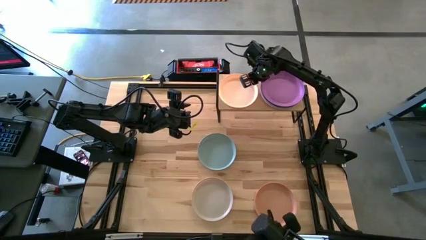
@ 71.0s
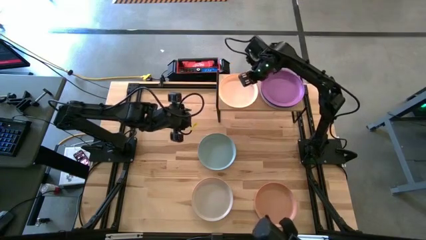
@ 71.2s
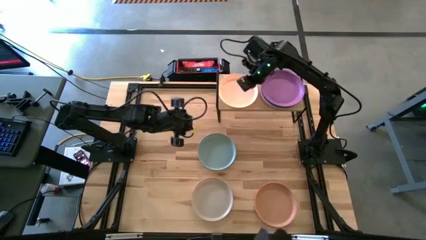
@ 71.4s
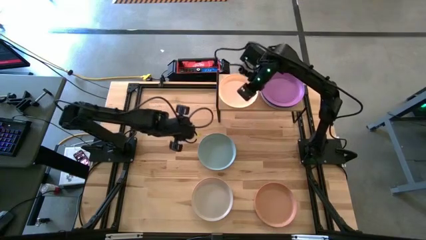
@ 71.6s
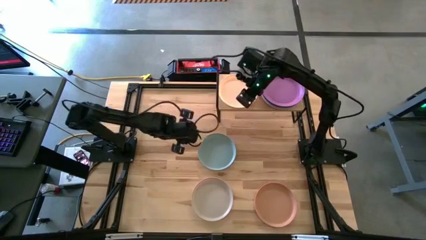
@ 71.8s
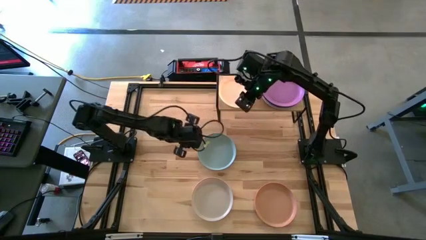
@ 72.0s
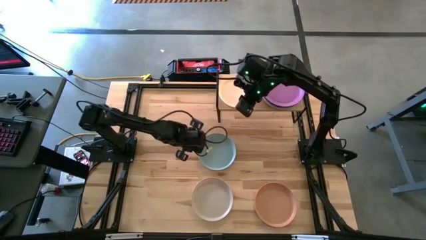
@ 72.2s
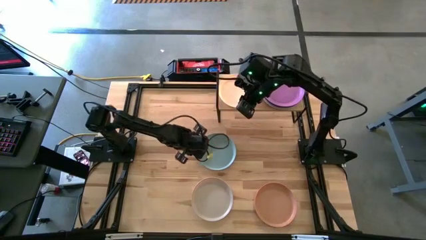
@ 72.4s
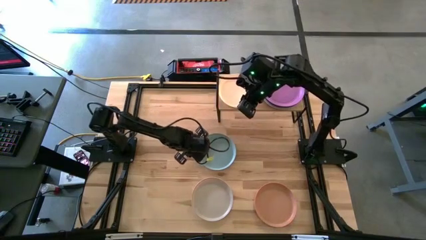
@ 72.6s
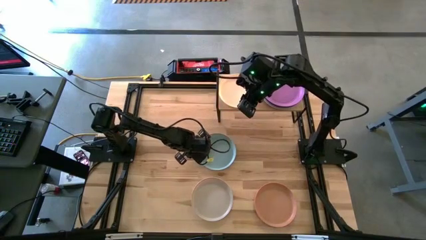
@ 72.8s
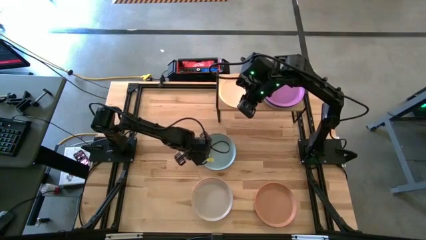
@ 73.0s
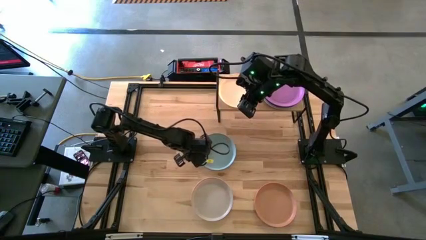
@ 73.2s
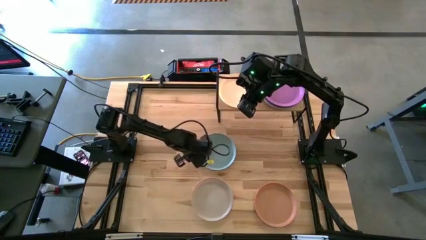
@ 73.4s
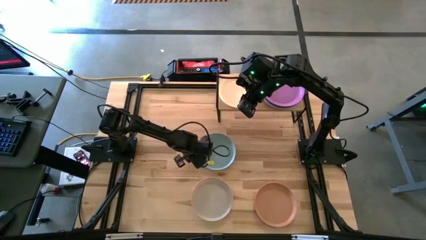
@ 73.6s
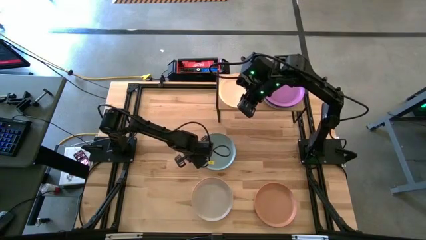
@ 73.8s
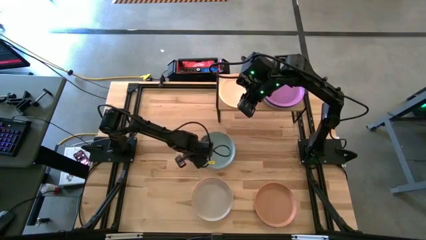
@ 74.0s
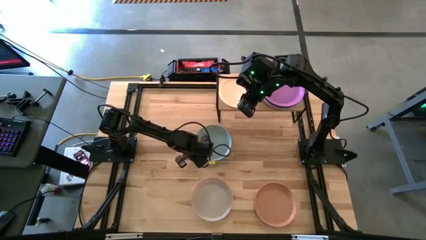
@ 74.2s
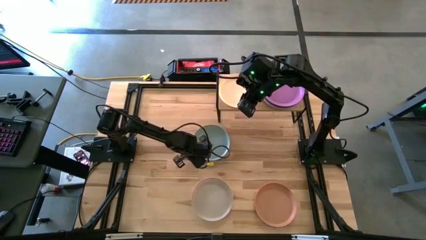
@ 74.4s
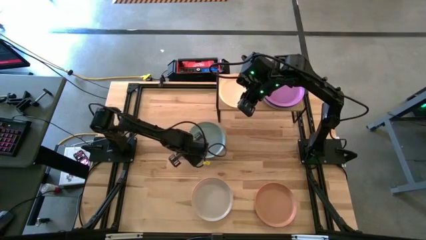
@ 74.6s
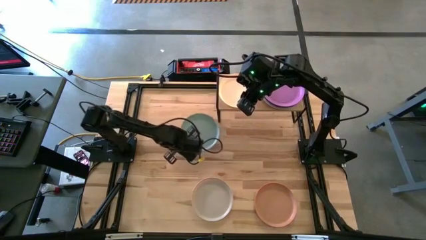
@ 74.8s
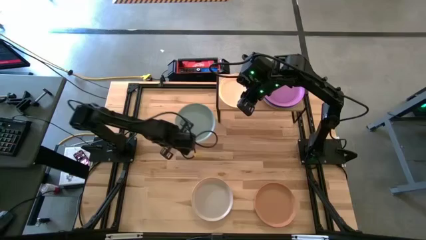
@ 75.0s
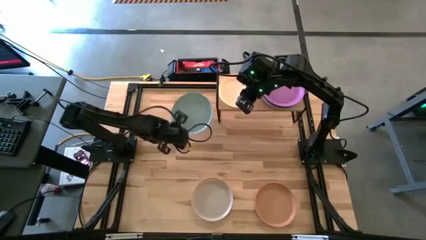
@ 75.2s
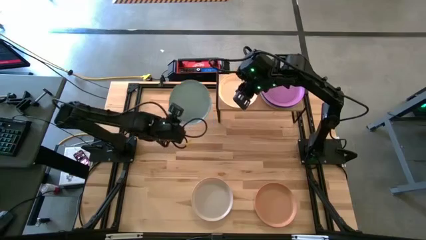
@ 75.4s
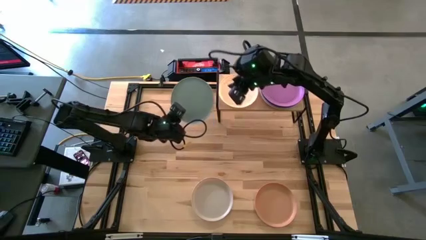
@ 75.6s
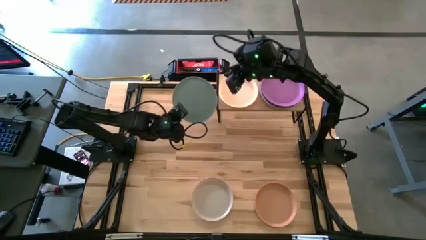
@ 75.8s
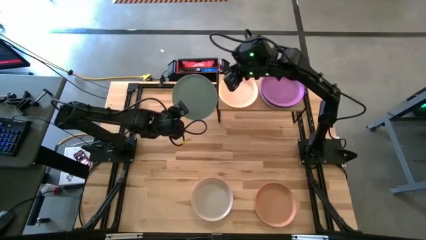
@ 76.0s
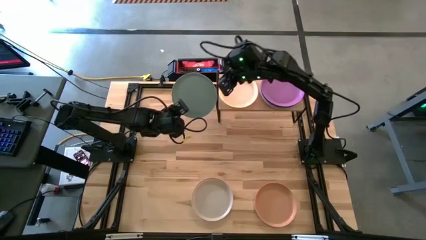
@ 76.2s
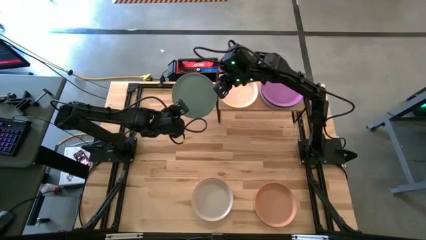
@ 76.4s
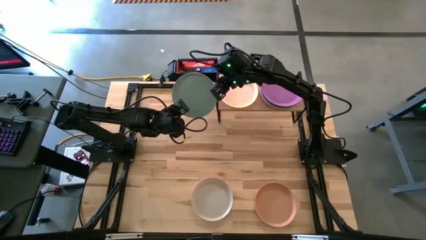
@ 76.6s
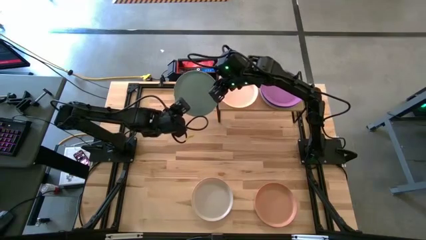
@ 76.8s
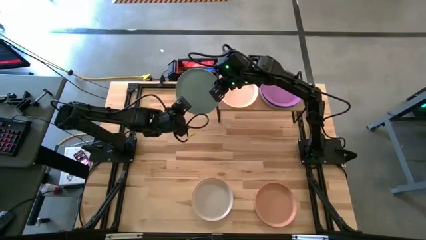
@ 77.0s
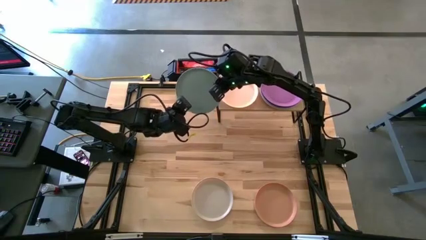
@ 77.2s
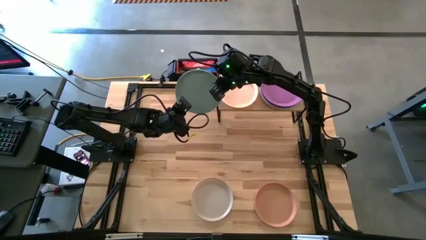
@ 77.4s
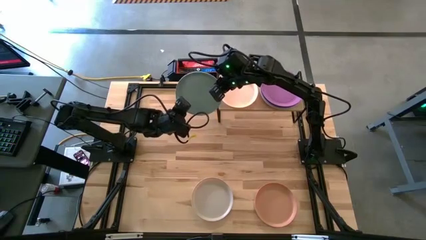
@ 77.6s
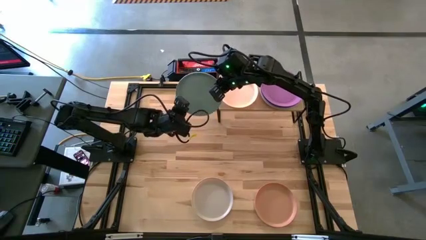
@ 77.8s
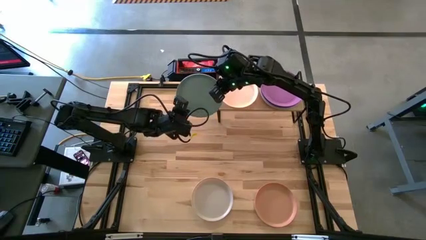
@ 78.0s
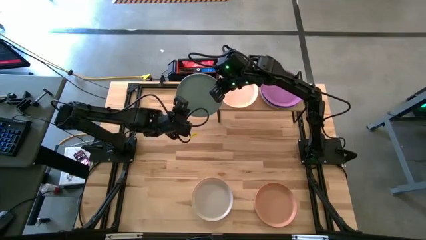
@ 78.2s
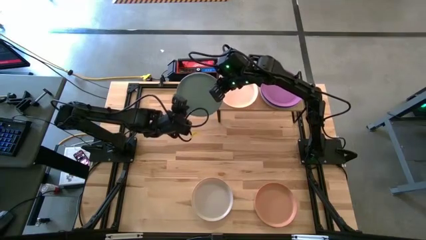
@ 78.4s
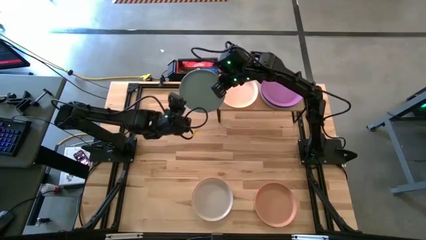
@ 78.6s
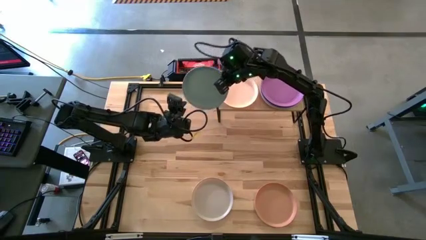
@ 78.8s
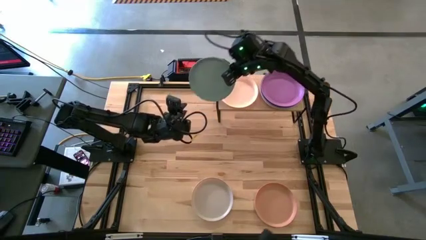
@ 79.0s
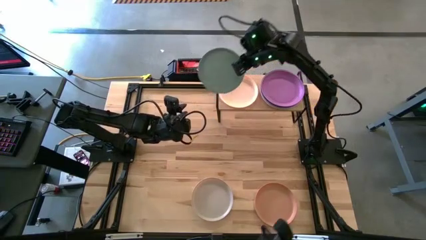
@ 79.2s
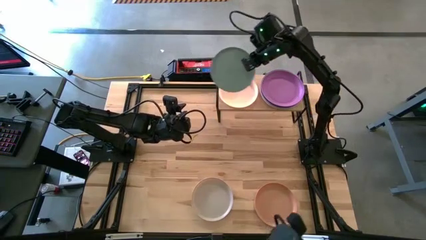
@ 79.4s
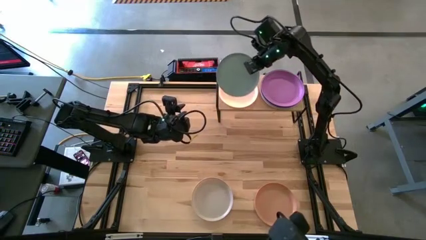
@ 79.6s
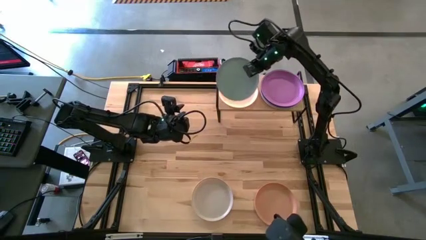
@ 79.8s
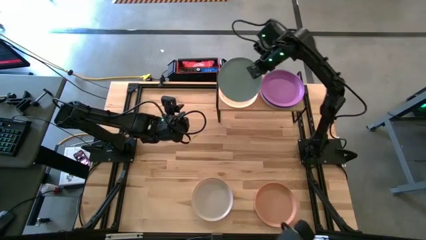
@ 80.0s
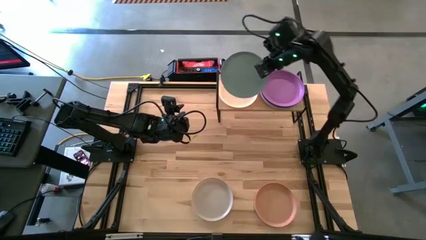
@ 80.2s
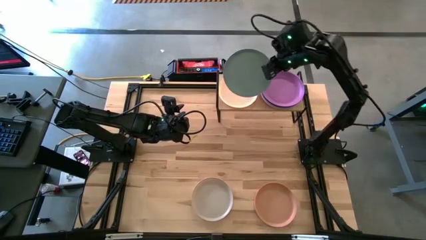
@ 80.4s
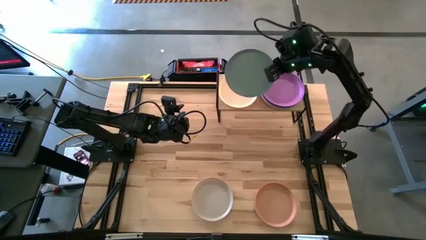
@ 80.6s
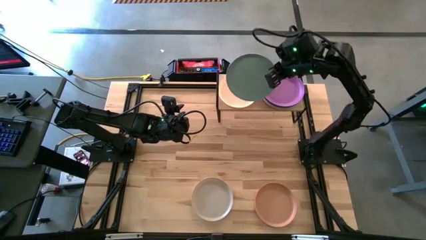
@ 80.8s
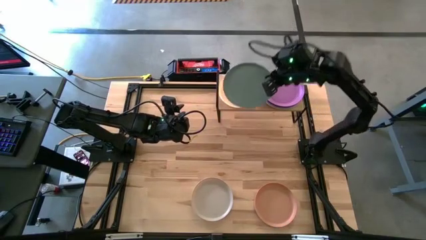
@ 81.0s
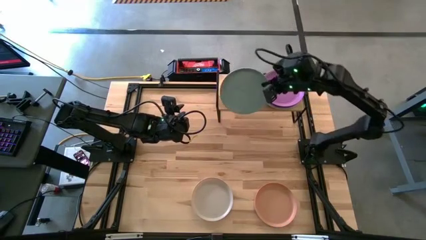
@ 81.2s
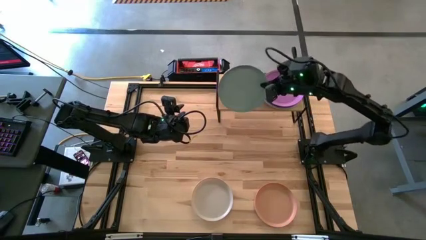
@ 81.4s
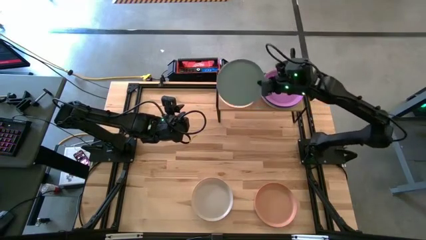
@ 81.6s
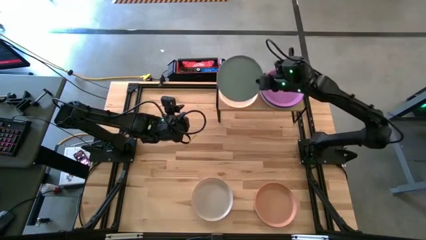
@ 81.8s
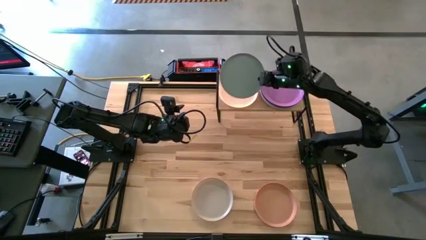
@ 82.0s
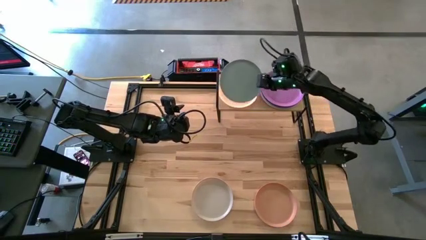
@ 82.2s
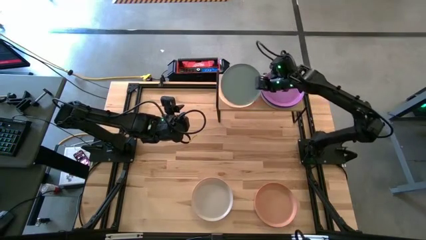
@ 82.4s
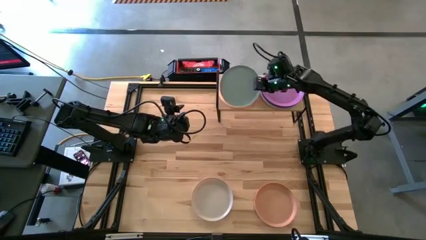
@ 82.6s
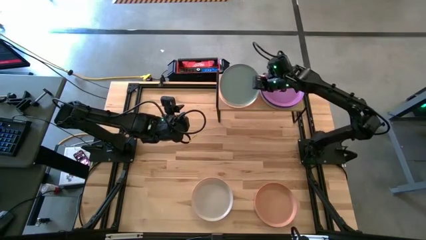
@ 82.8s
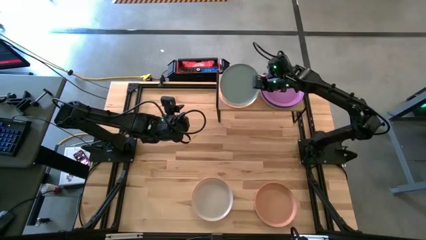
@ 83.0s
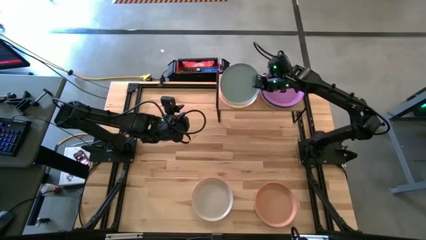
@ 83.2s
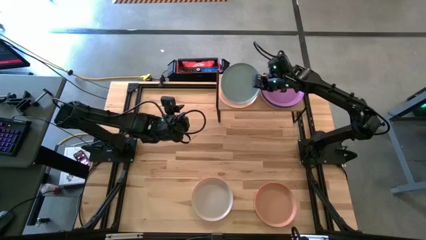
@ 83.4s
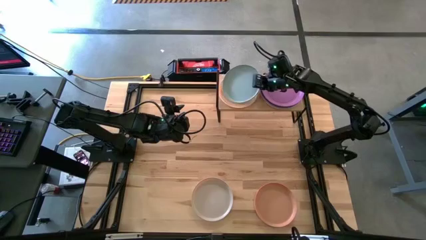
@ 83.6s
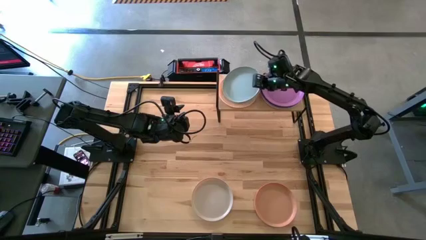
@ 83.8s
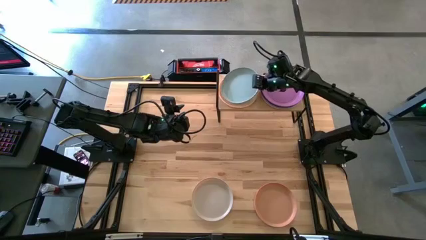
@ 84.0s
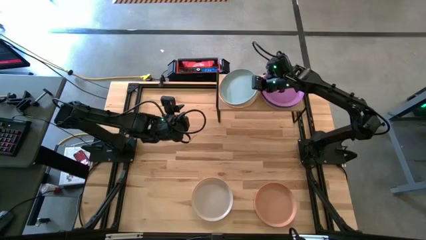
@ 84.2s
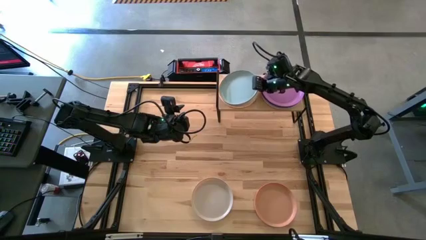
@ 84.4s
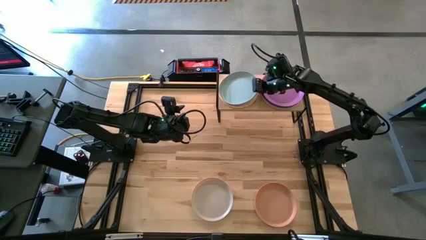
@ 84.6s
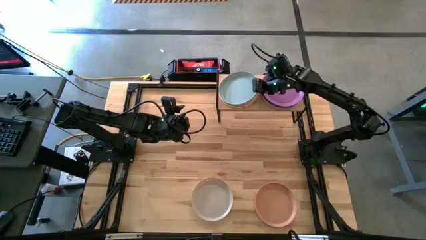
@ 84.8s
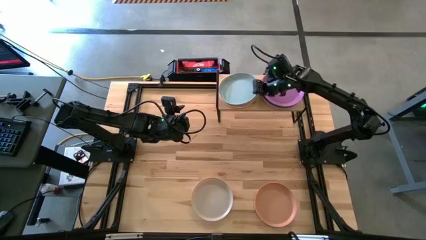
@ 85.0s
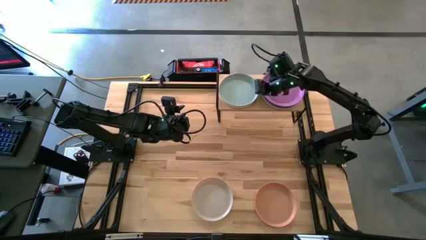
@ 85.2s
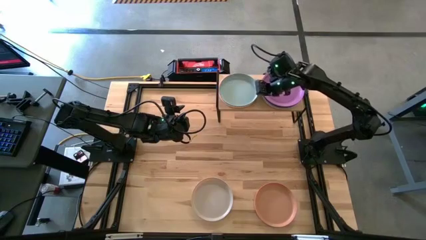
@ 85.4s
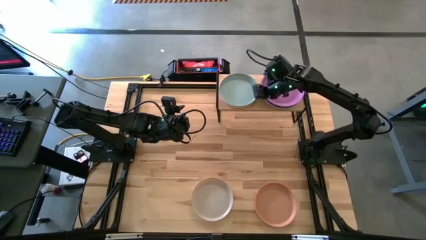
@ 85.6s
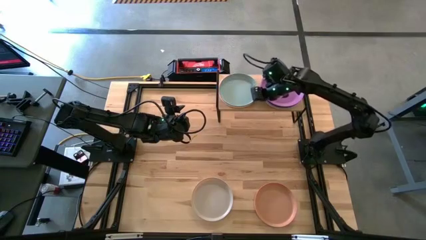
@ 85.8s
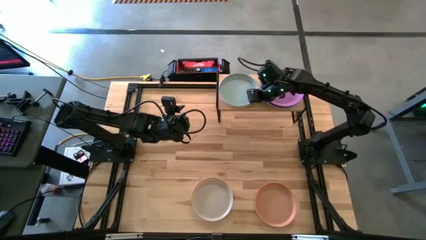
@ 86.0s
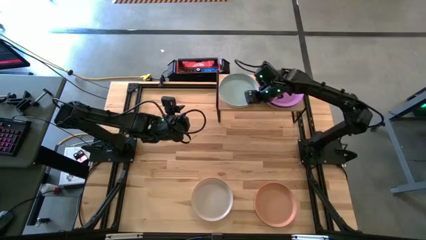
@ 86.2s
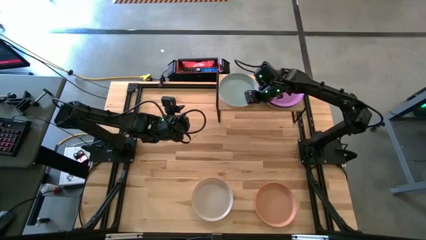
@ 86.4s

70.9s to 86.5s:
Task: Place and stack plates onto a shelf
Stack the light blue plate on top of the yellow plate on the shelf

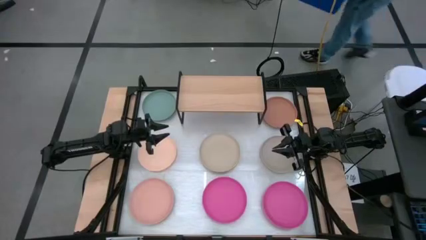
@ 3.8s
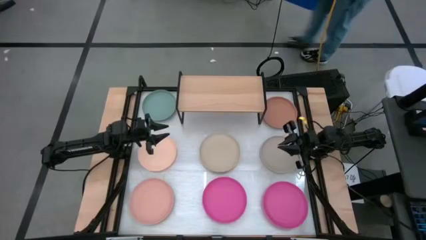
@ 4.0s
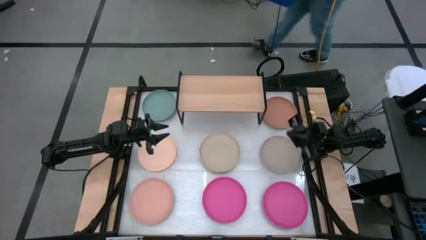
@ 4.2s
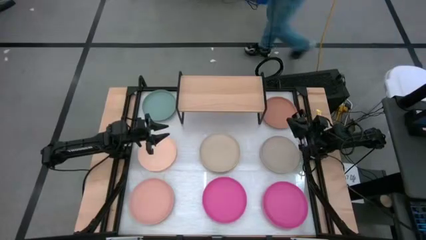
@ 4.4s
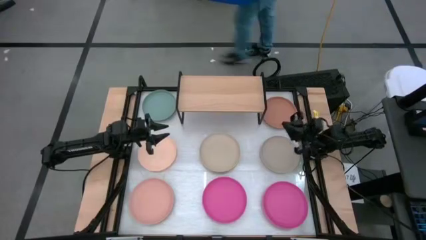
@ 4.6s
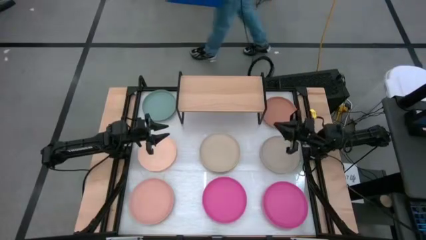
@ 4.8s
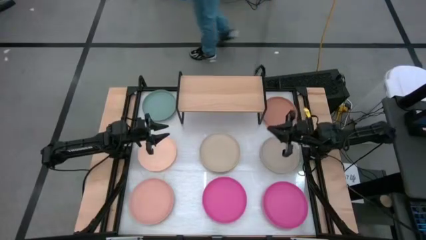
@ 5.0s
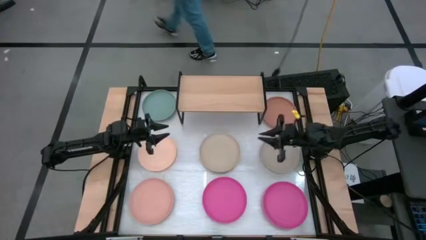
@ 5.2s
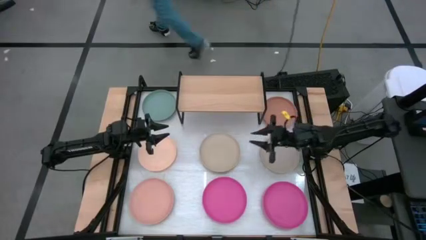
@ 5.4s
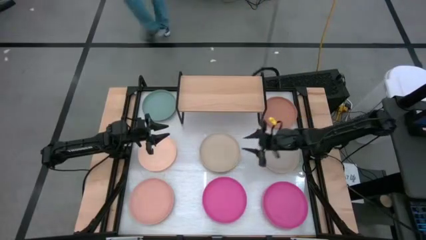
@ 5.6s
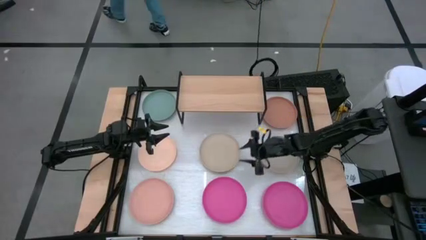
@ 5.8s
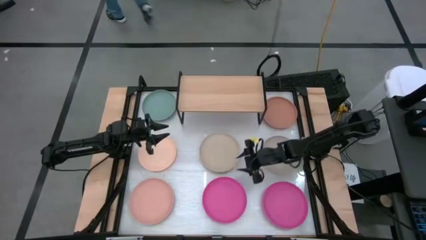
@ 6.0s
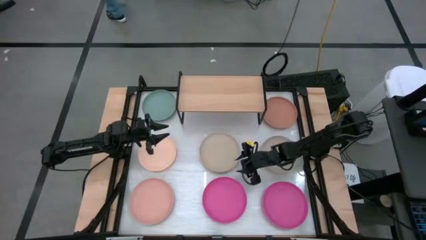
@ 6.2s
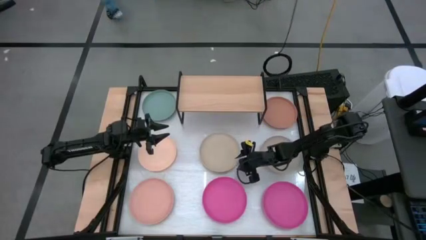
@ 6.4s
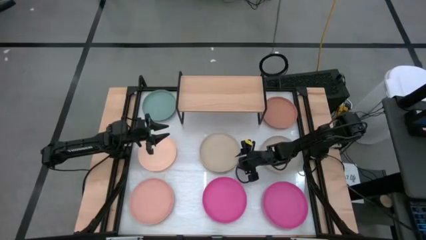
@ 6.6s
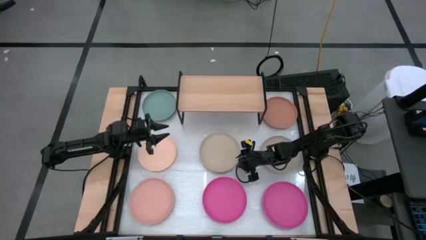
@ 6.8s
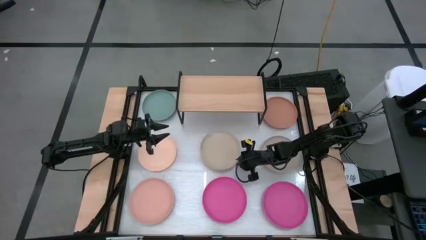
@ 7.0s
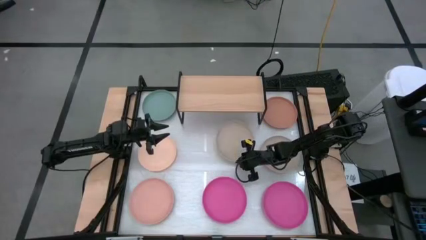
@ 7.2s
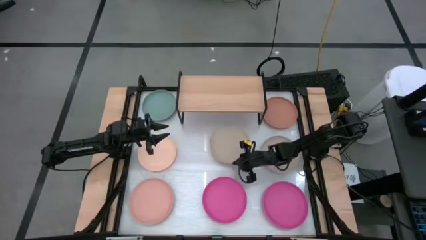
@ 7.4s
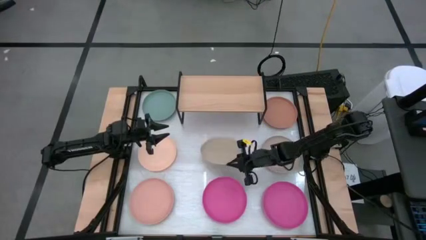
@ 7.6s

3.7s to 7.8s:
Task: Place and stack plates onto a shelf
Put the light brown plate on the shelf
